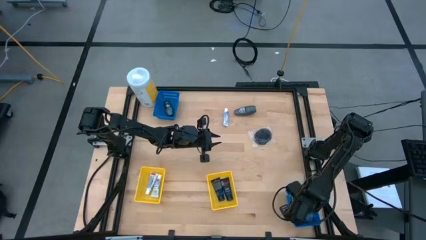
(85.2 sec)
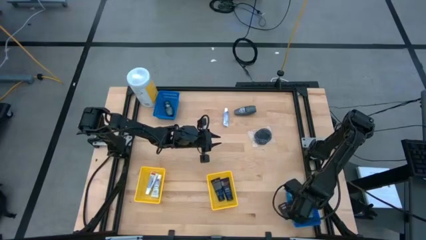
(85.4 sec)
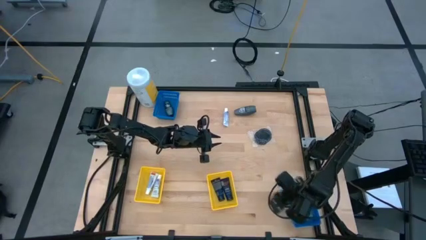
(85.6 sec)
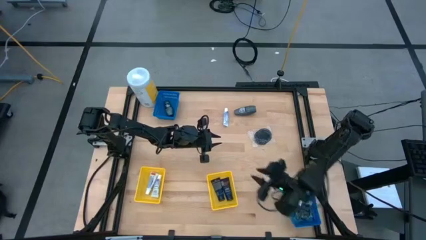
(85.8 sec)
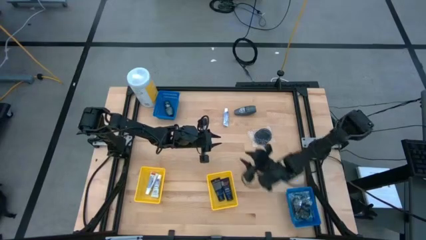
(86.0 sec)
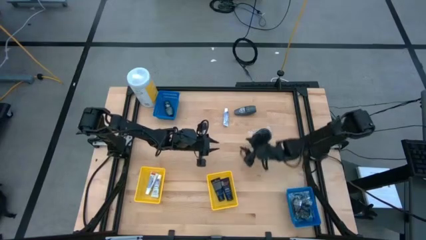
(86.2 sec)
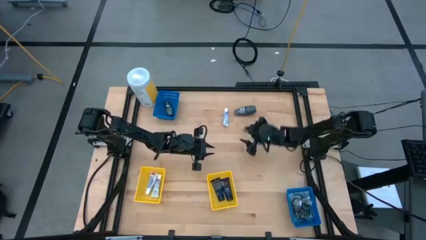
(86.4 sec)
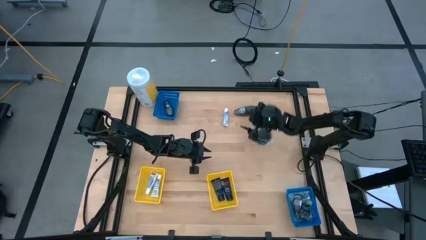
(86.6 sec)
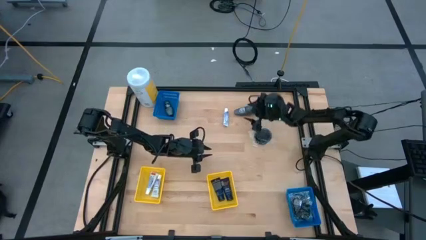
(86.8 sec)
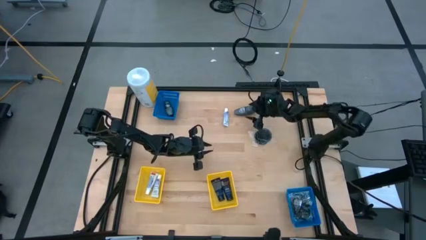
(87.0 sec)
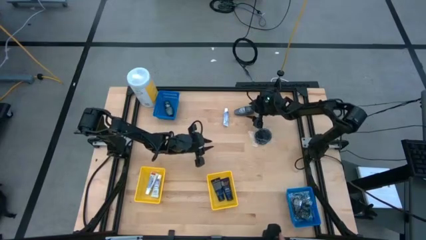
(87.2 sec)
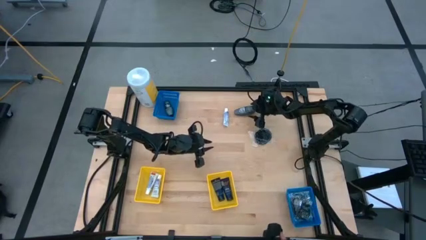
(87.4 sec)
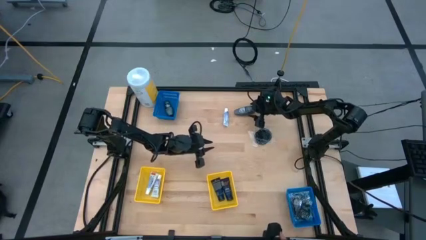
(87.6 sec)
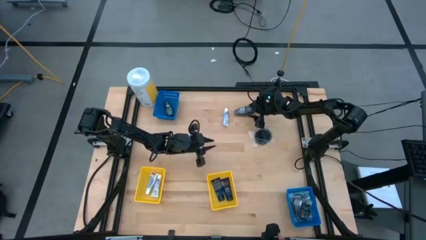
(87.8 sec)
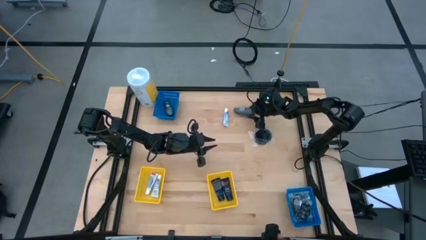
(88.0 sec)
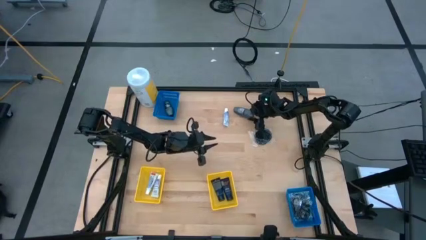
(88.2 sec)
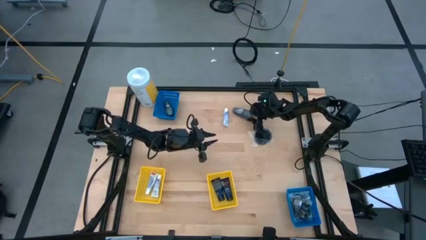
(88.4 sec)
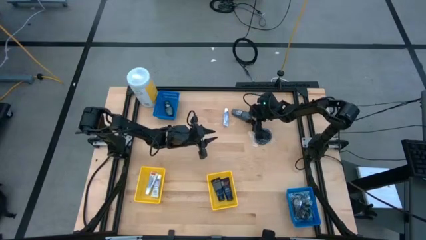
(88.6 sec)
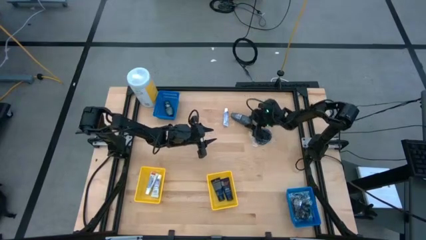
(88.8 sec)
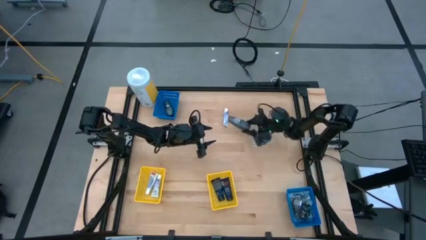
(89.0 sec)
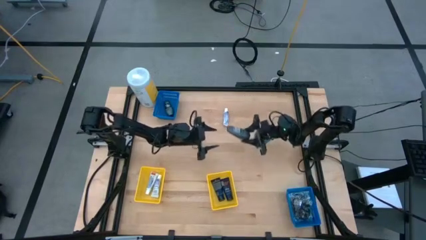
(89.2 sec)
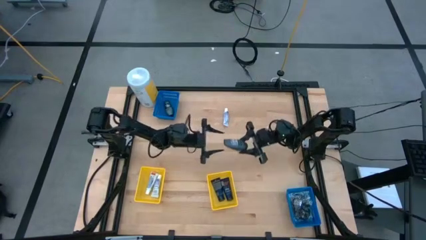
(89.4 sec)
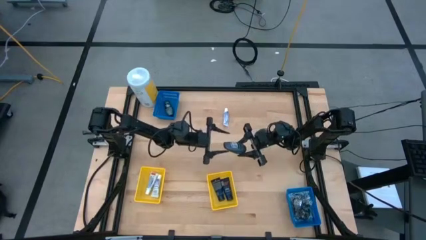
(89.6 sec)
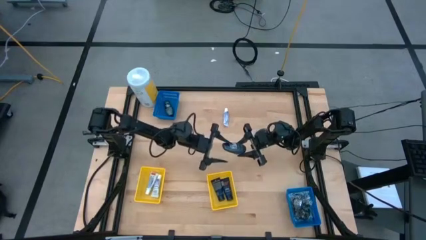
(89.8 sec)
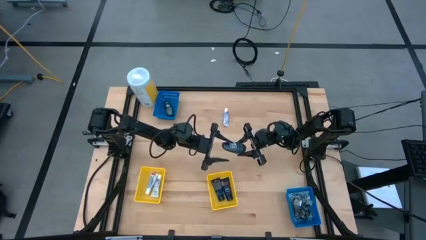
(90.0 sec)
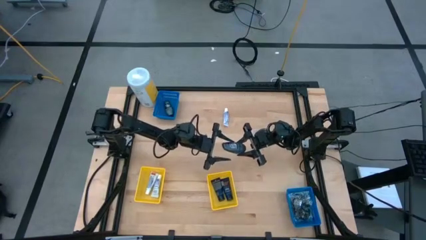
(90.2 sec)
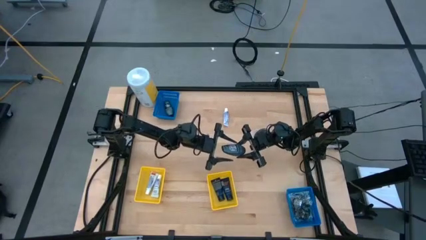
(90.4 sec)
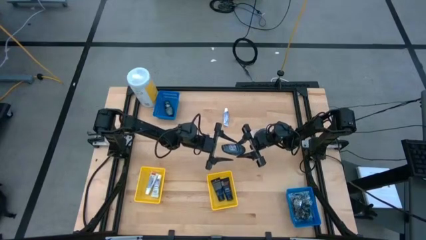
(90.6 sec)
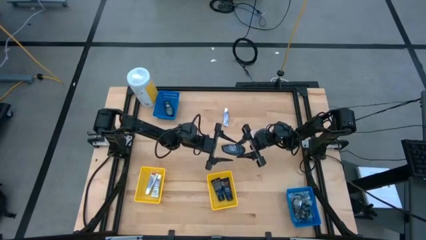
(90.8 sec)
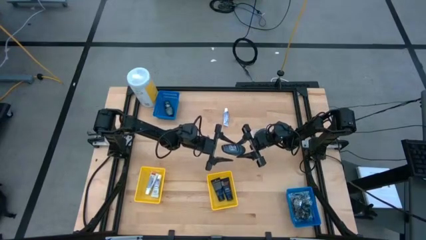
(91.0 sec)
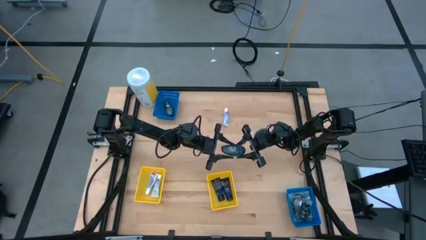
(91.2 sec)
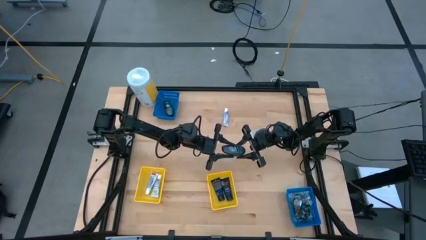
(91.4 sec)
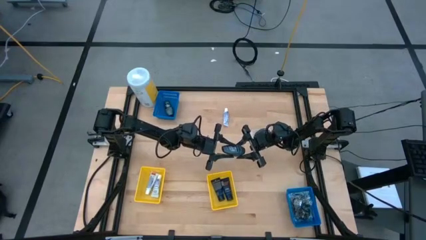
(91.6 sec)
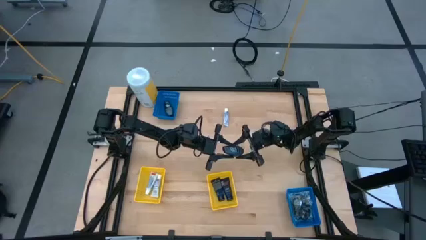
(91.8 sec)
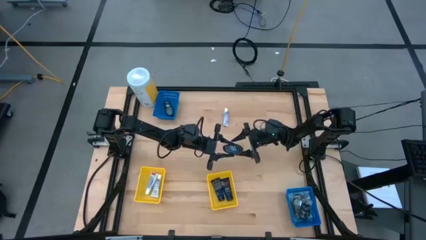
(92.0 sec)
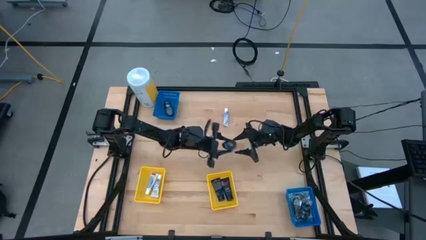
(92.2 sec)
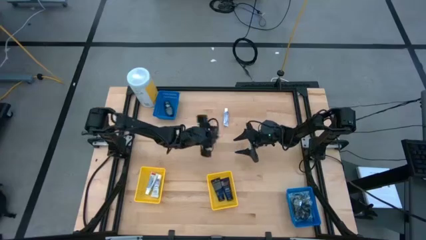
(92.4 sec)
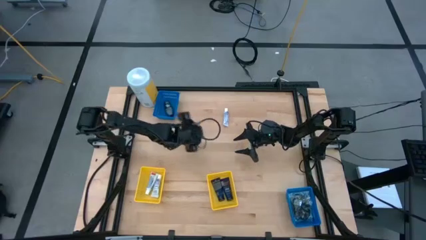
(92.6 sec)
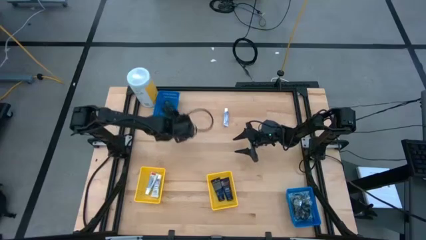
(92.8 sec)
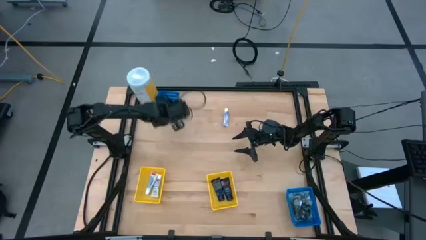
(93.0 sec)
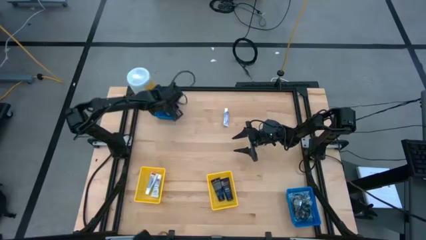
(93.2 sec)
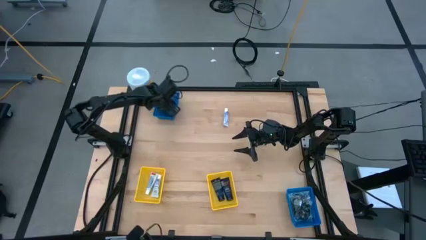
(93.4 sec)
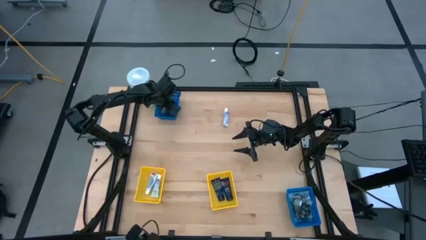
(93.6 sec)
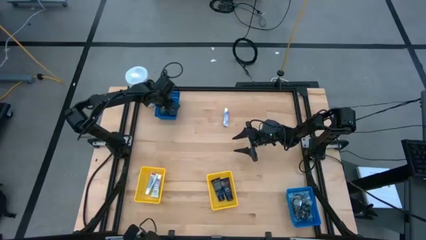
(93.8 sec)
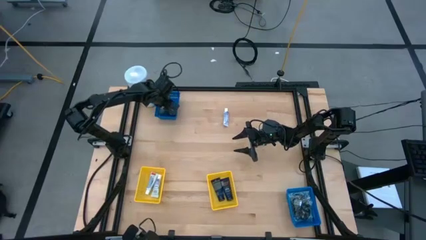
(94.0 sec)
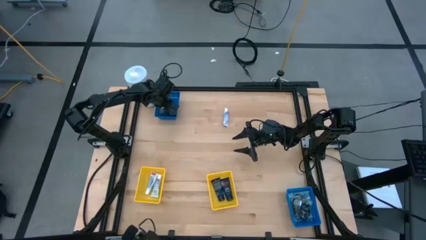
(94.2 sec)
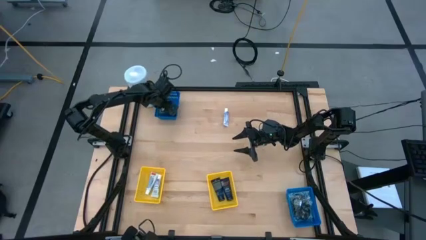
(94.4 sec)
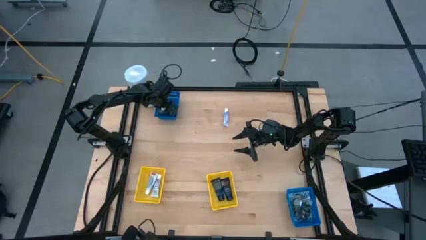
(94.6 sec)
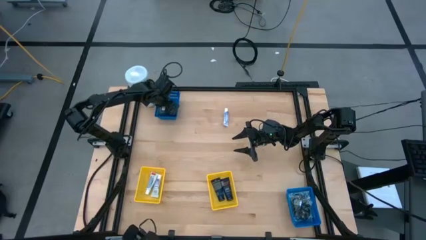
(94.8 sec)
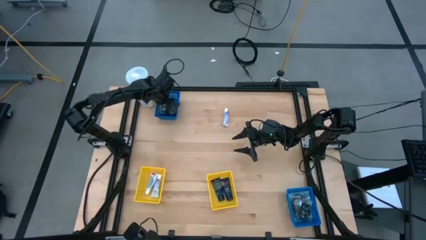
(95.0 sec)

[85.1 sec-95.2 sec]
Task: Pick & Place Travel size toiletries
Put the black deodorant into the top blue bin

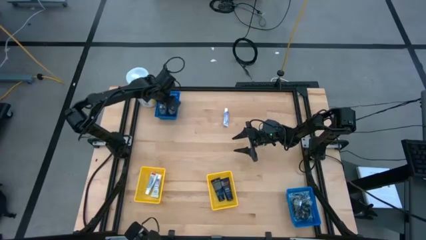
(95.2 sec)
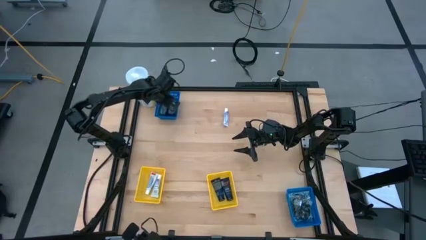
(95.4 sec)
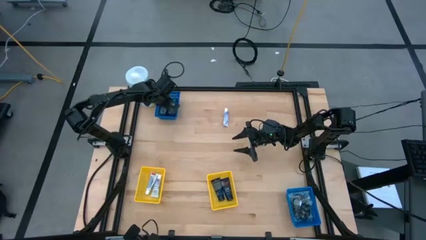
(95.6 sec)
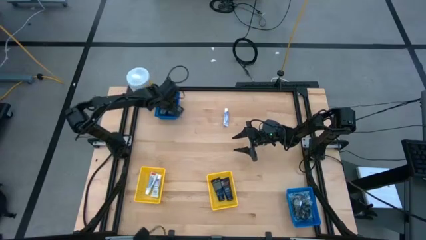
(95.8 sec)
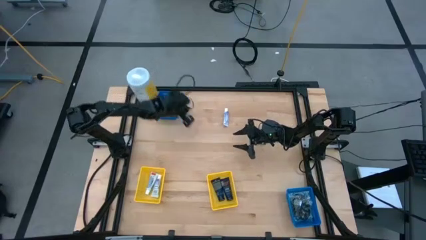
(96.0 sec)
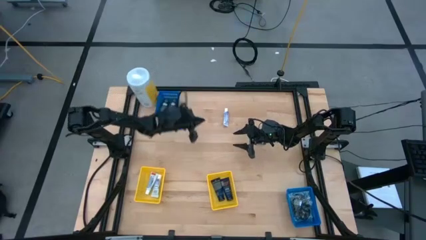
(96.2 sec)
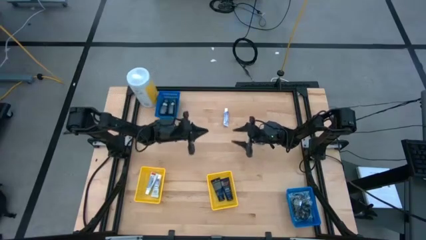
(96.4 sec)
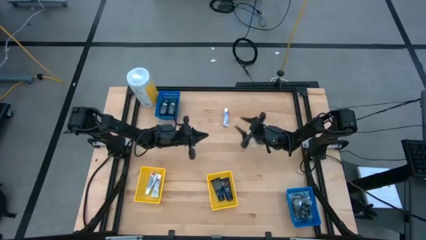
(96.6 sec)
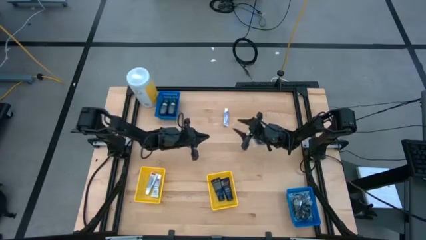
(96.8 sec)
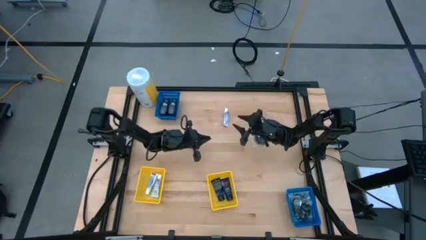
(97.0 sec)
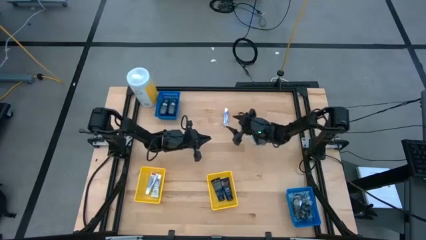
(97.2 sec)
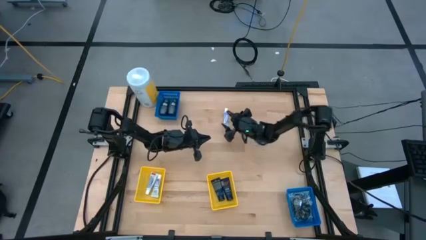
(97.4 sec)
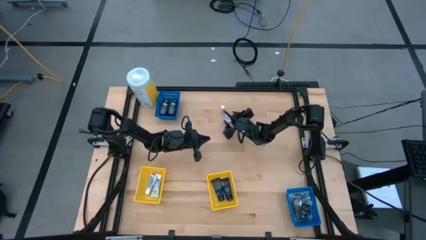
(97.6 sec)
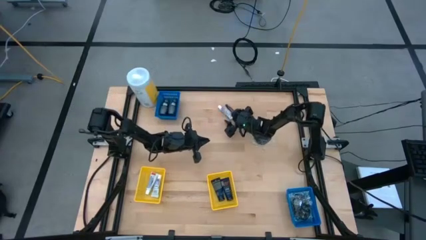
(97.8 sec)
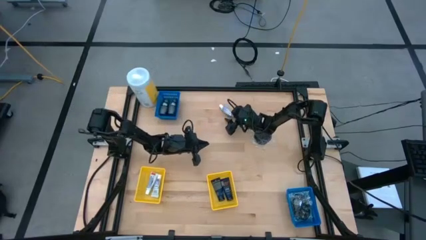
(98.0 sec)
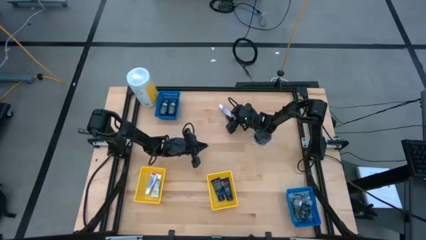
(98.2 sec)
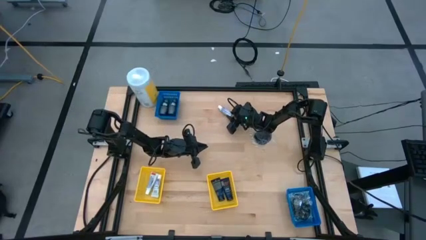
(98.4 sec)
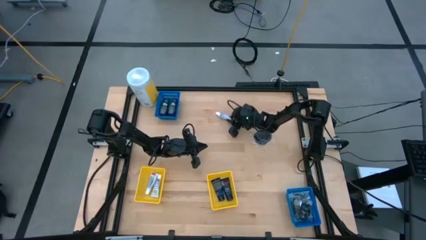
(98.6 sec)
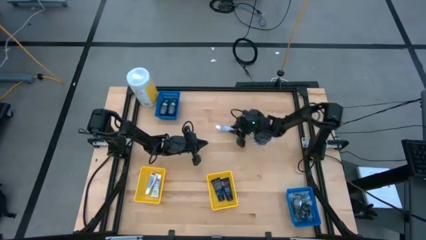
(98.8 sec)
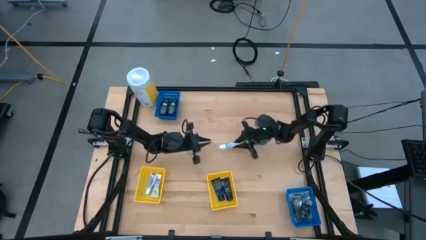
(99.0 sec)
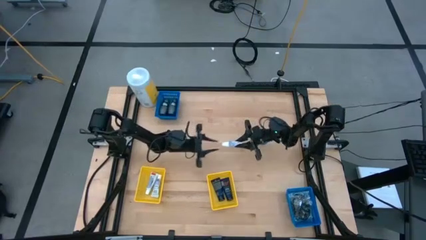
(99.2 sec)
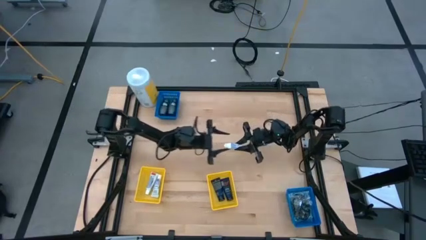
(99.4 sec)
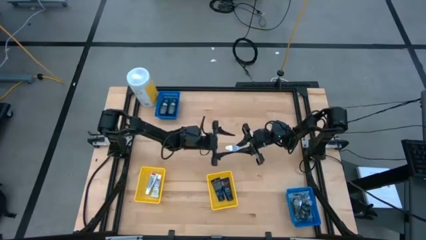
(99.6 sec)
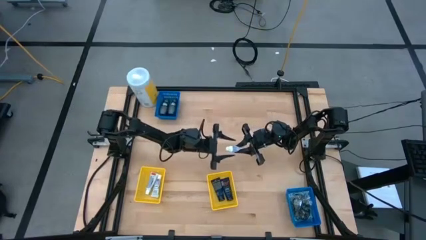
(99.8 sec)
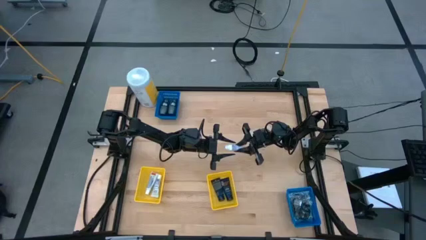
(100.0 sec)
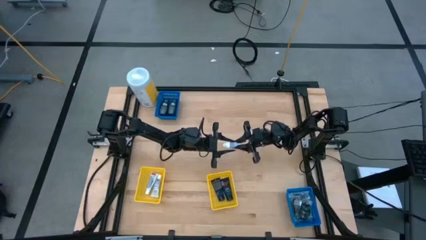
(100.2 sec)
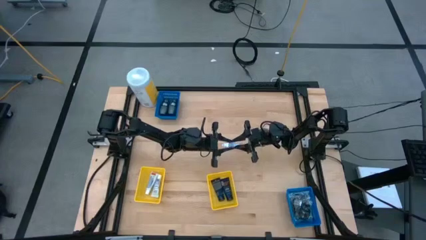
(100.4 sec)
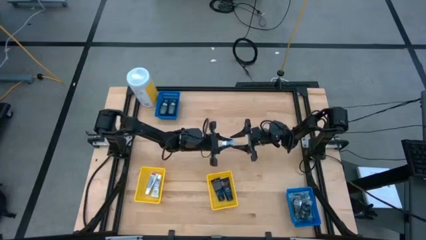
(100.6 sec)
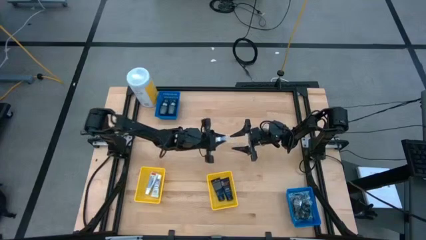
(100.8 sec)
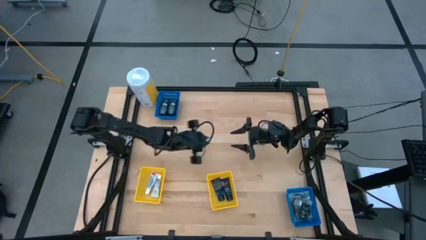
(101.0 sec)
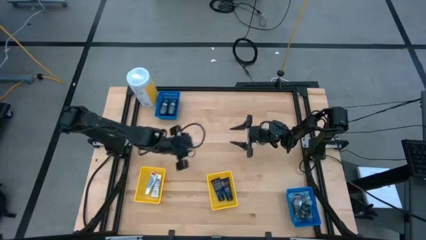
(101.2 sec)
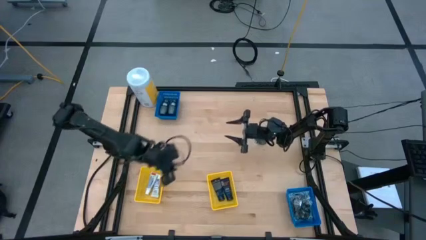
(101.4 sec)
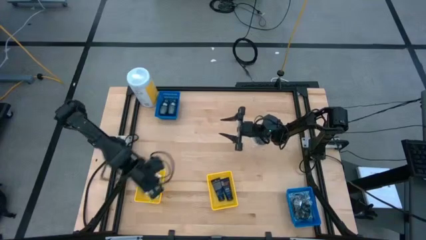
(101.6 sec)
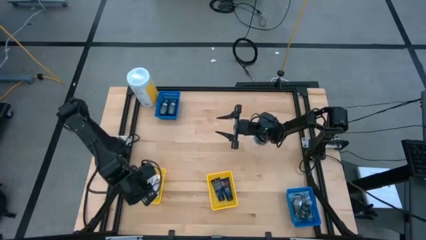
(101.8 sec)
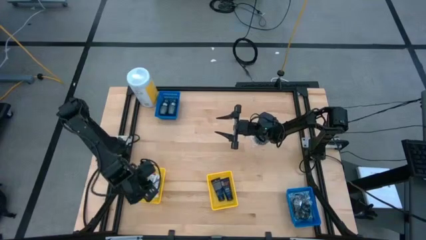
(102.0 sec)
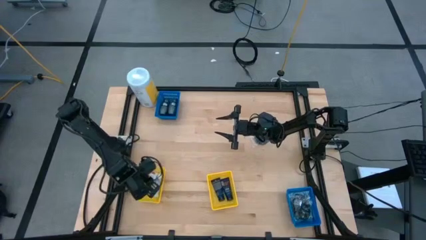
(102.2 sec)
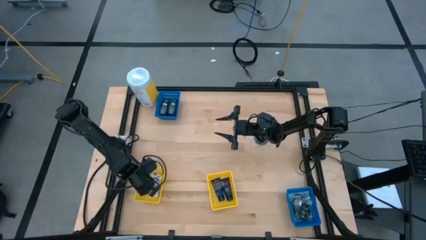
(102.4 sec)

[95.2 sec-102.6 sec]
Put the white toothpaste into the left yellow bin
